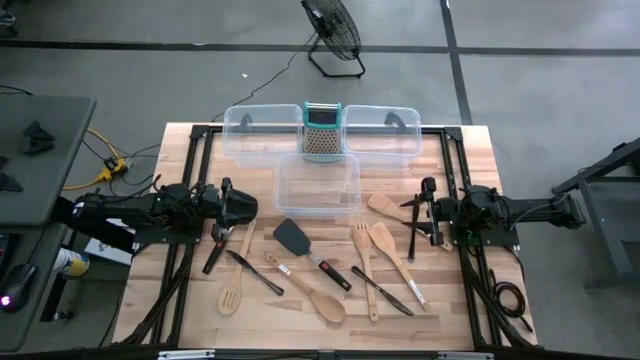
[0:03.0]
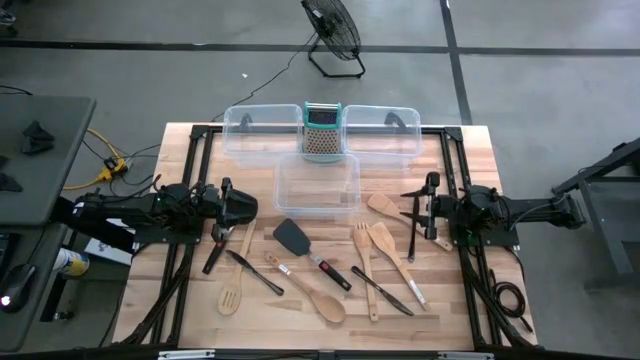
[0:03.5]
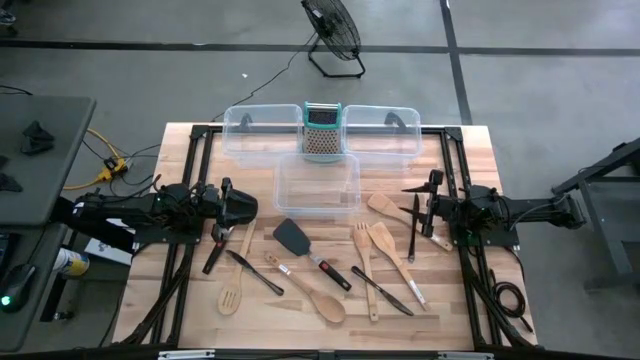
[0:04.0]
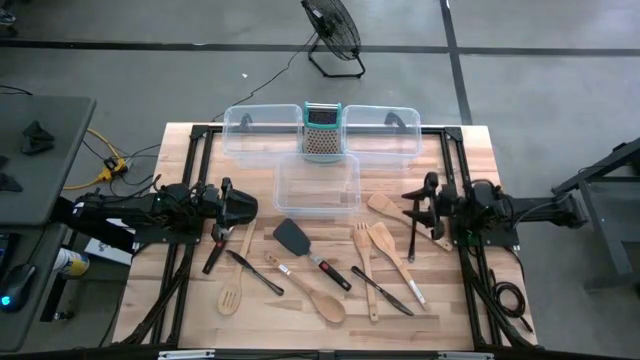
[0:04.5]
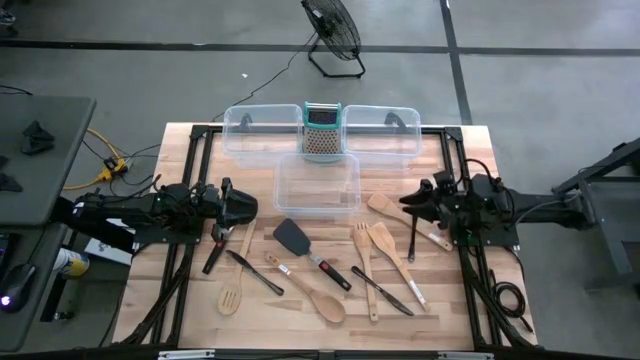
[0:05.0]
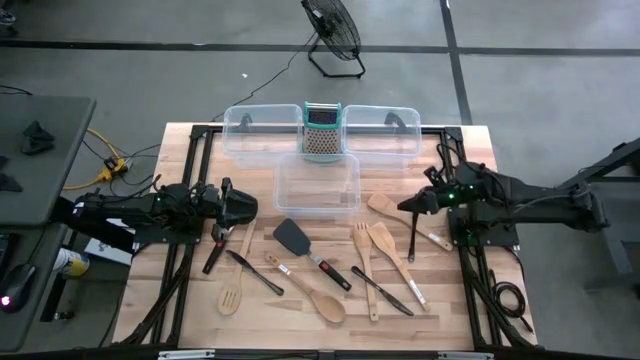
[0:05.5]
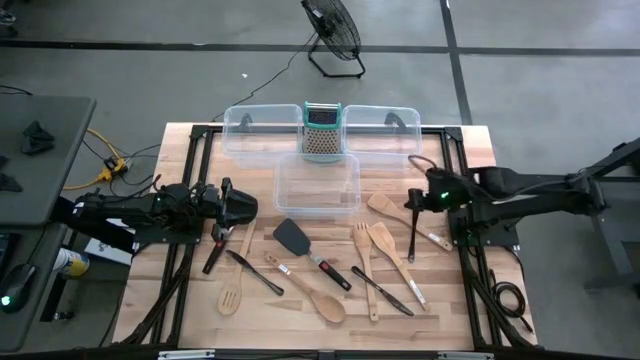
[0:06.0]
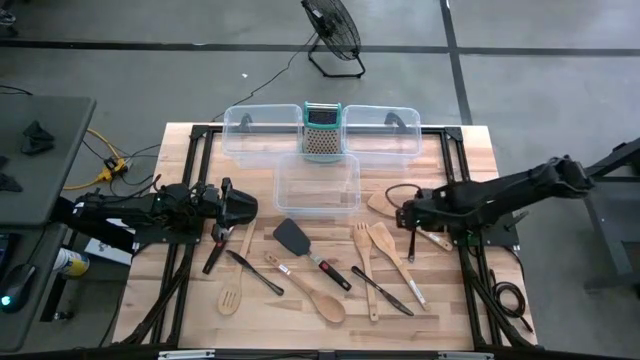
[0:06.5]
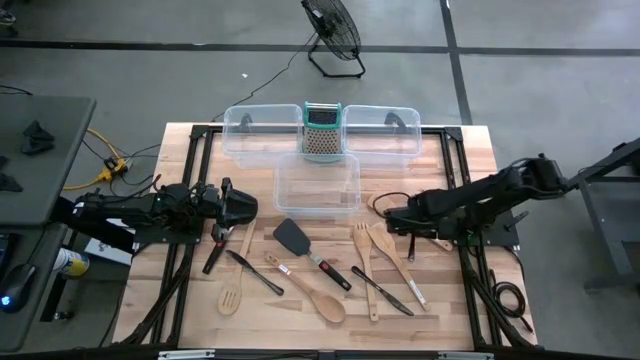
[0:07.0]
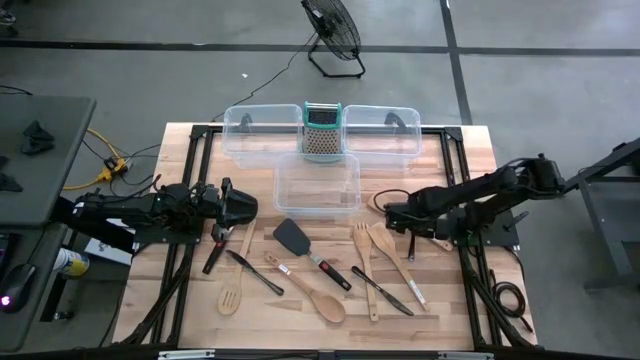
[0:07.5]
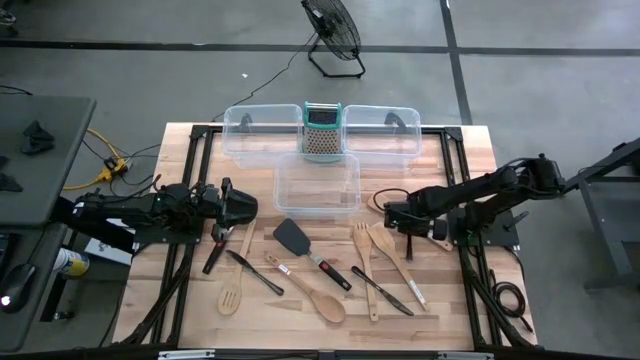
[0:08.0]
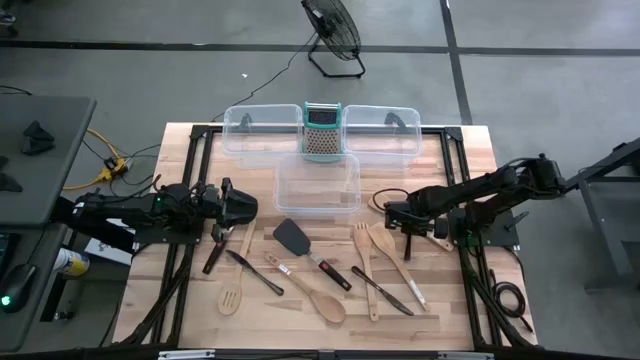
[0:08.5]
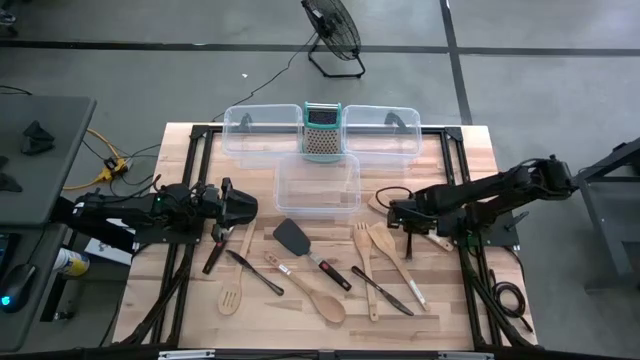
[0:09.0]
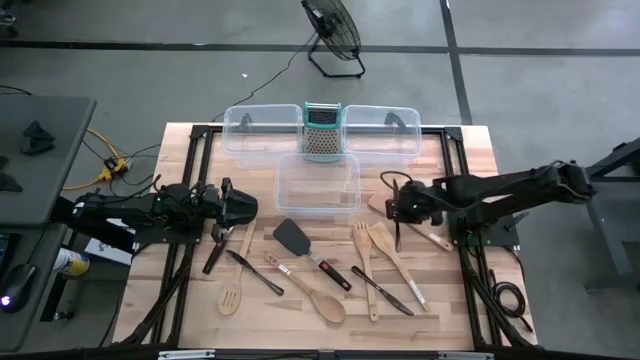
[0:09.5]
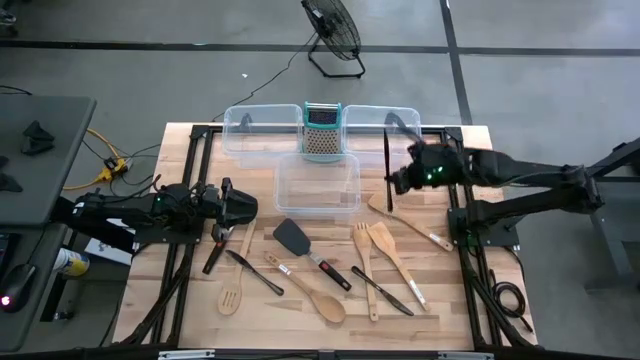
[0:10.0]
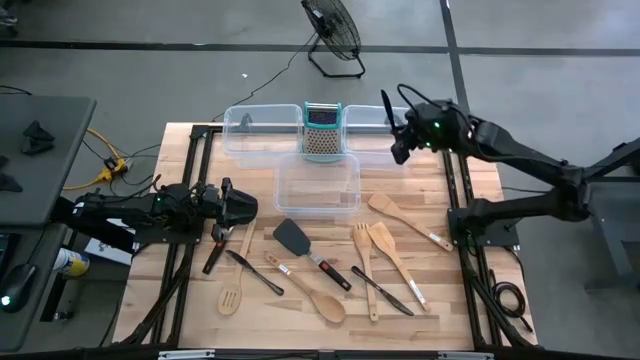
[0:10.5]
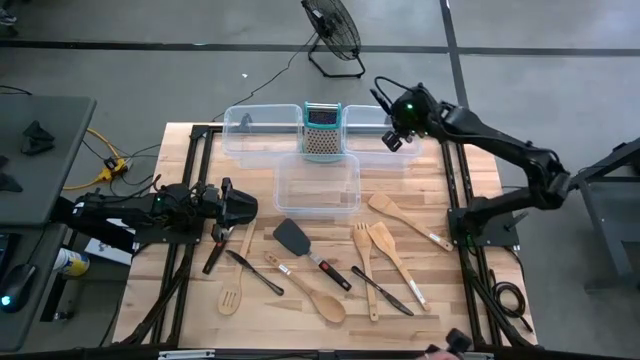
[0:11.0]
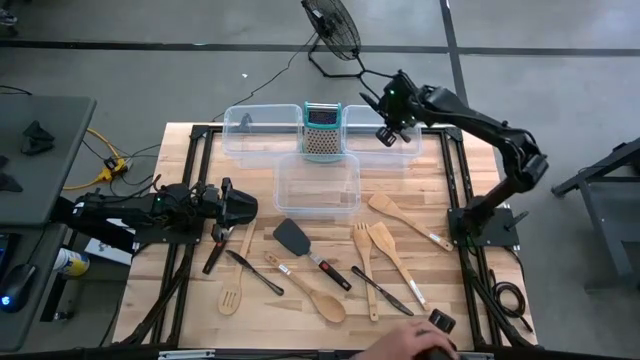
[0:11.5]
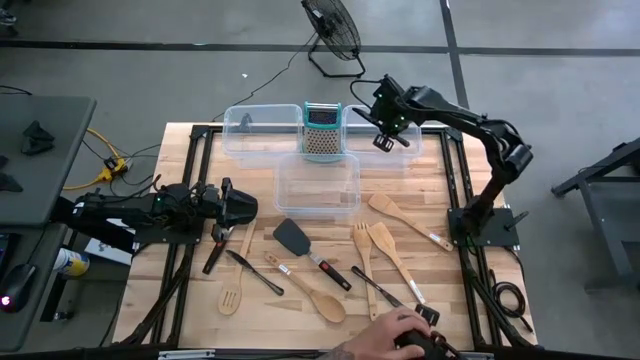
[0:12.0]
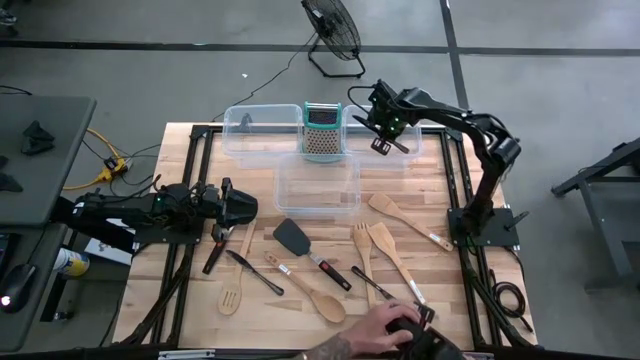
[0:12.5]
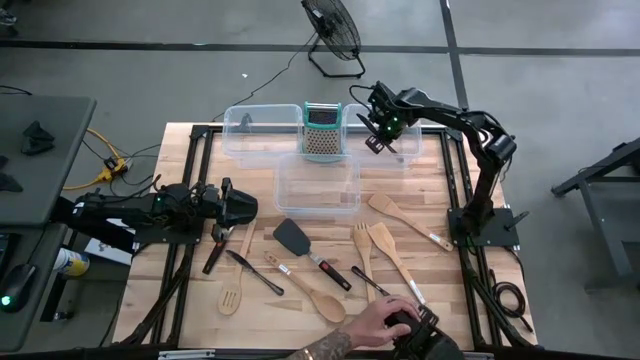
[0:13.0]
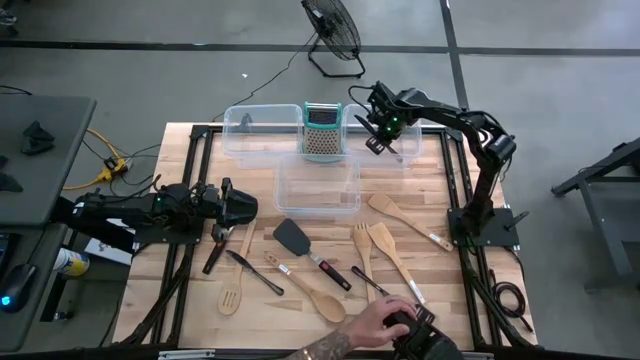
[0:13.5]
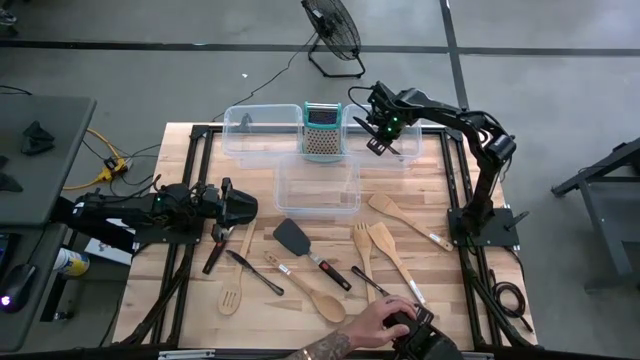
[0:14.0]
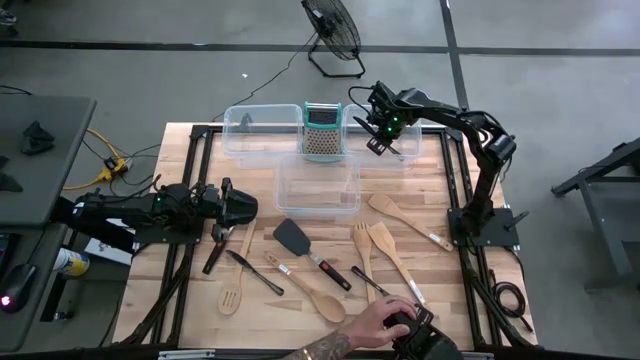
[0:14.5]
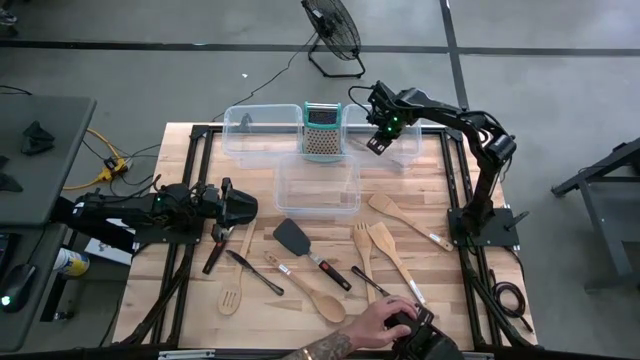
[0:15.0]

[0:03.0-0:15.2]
Task: Pick & Place Kitchen Items
Put the right black knife into the right transparent bin

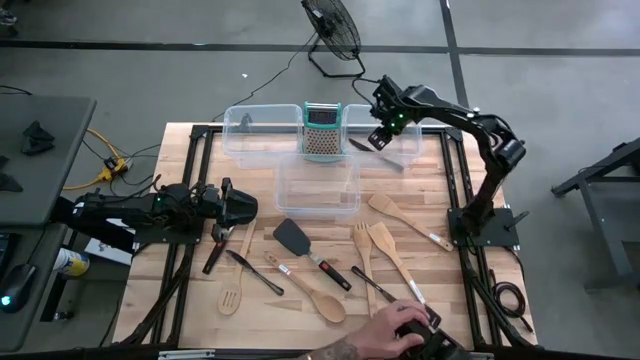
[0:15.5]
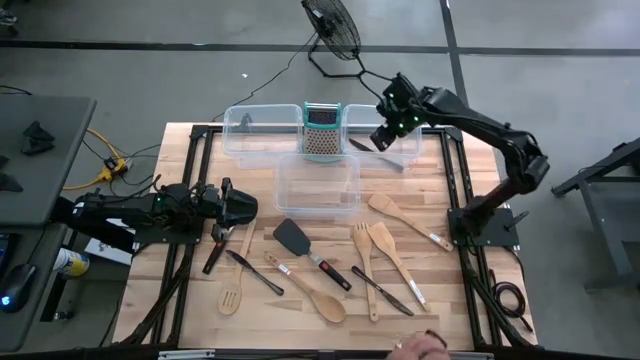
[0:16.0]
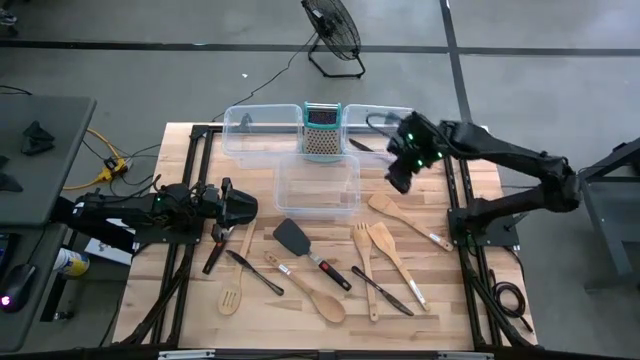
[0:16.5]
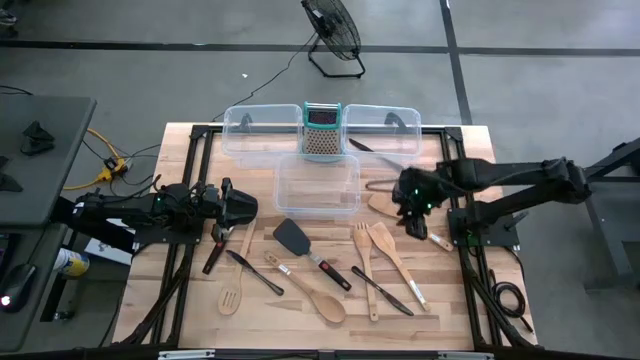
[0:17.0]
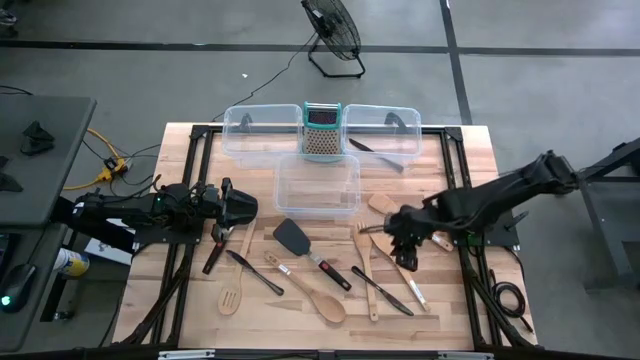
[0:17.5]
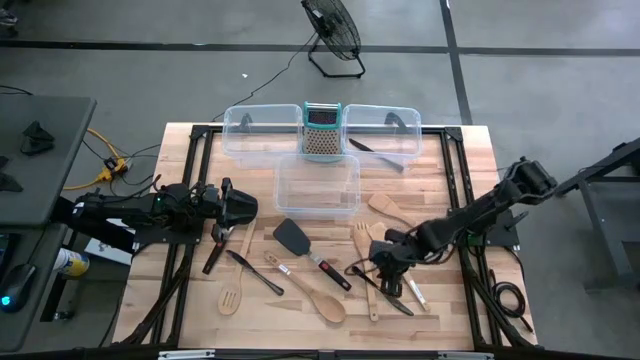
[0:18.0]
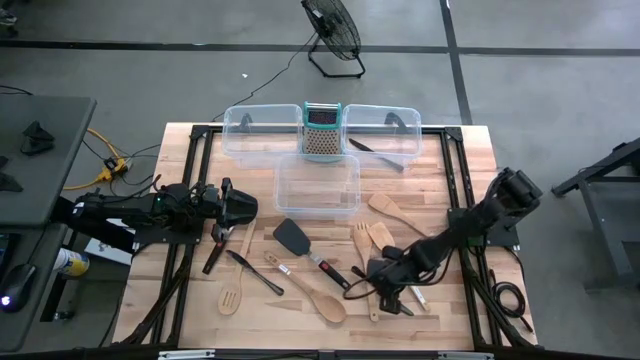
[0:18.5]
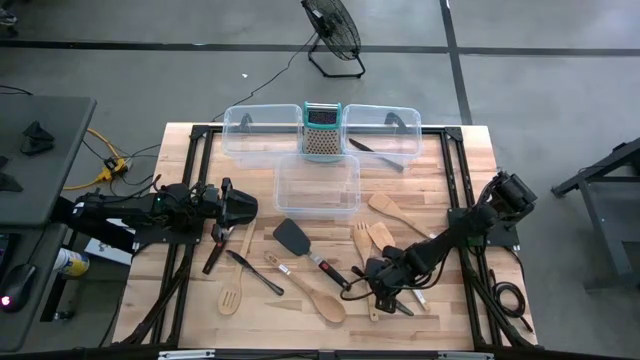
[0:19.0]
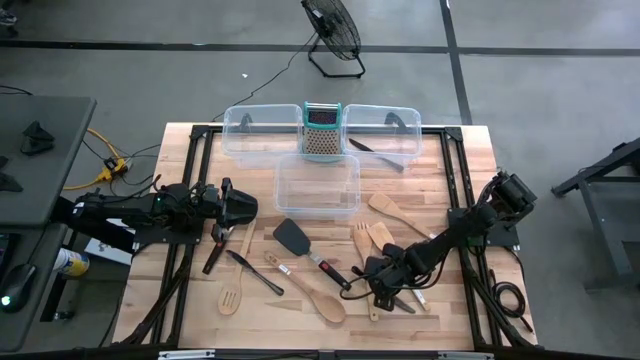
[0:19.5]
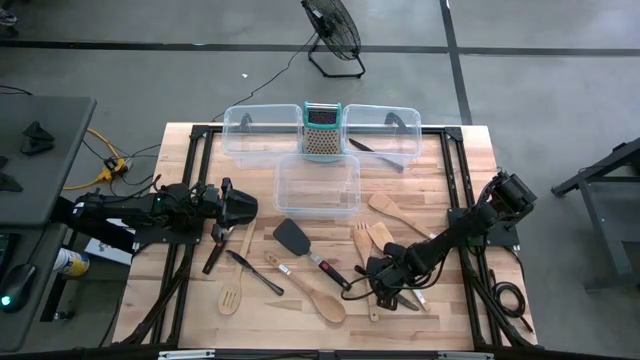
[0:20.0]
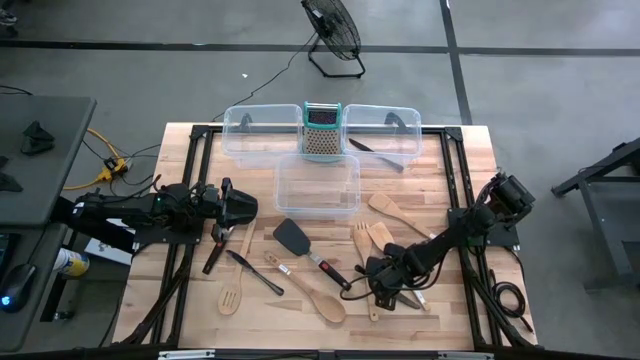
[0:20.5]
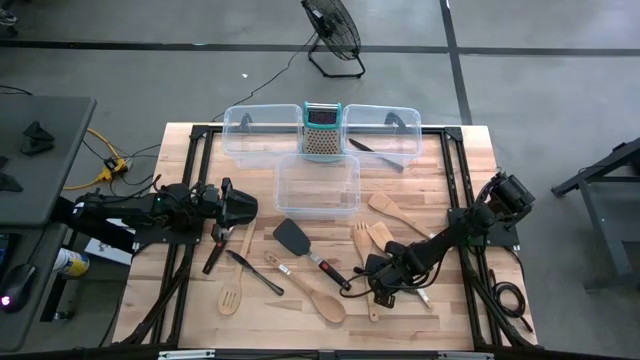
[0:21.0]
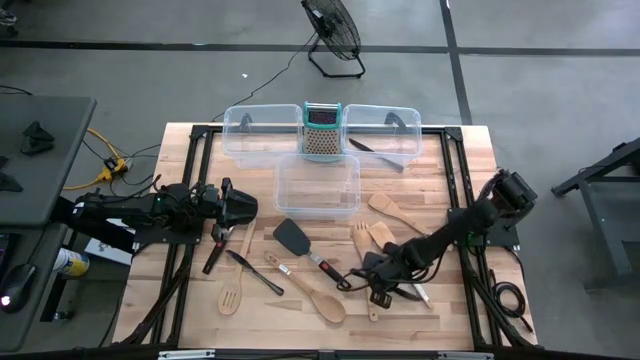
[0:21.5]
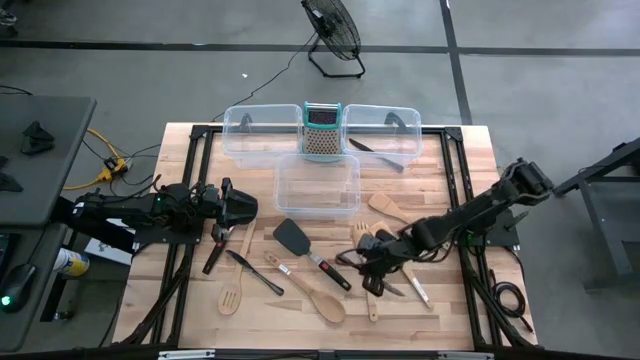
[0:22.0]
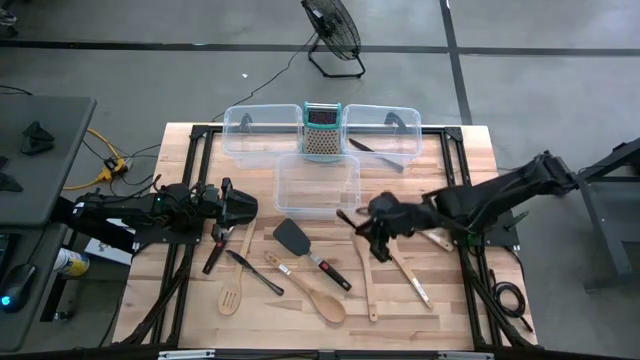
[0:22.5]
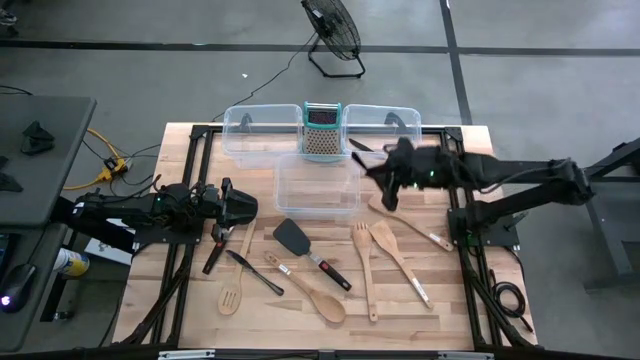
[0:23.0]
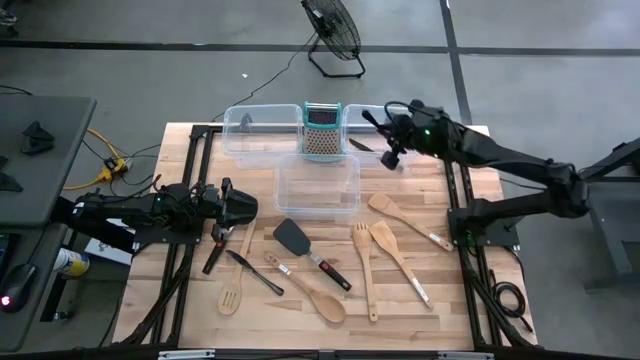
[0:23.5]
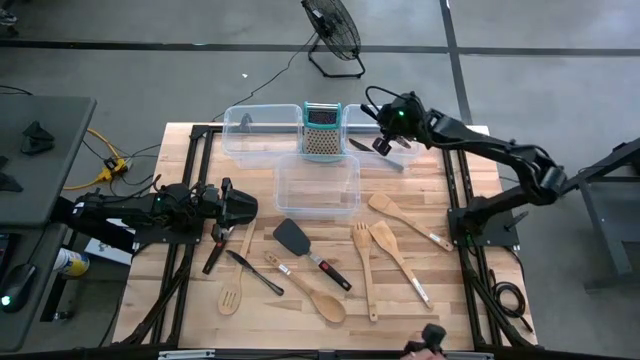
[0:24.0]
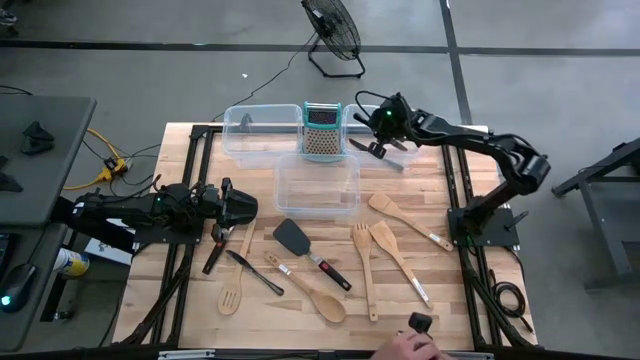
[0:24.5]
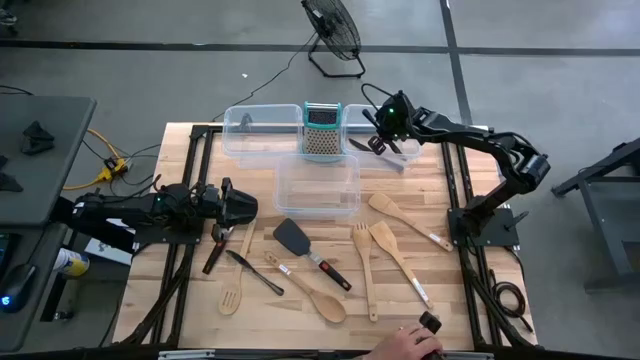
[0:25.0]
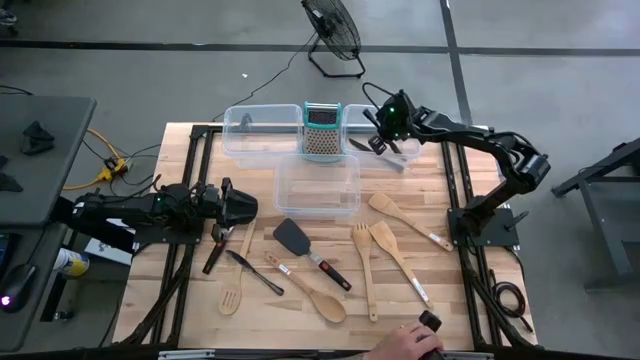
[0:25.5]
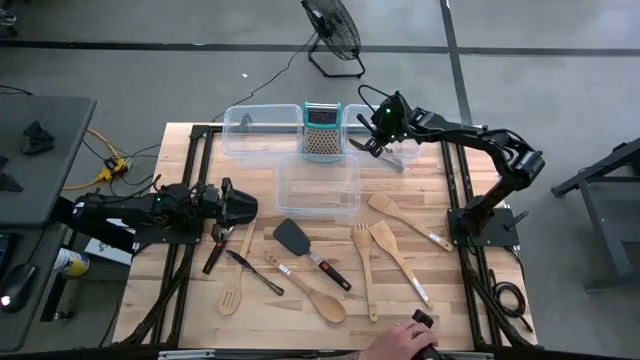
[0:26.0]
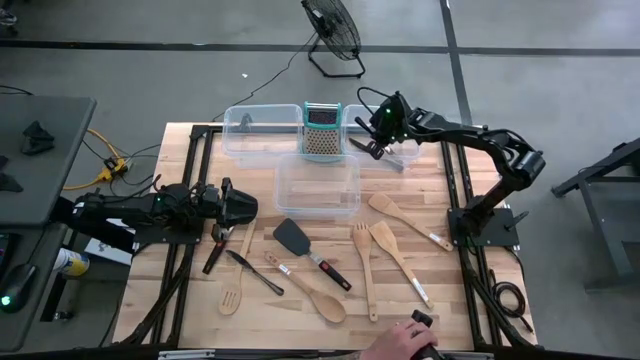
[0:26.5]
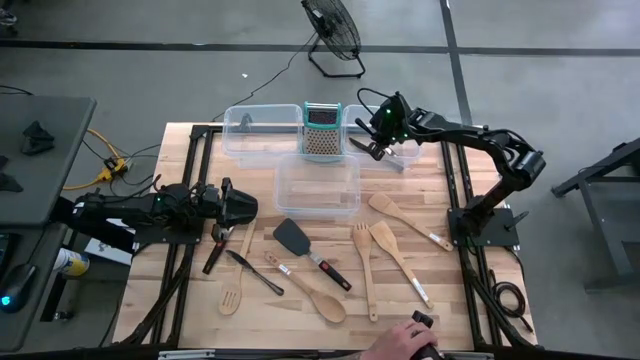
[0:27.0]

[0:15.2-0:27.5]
Put the right black knife into the right transparent bin
